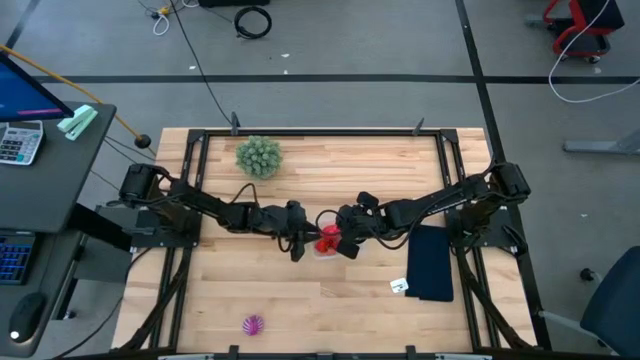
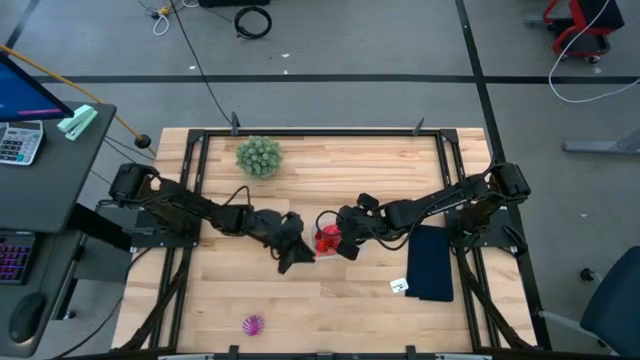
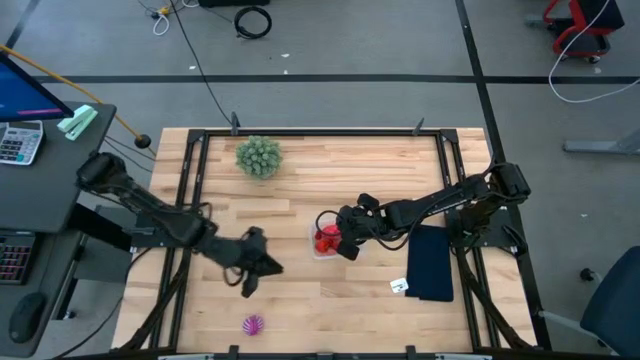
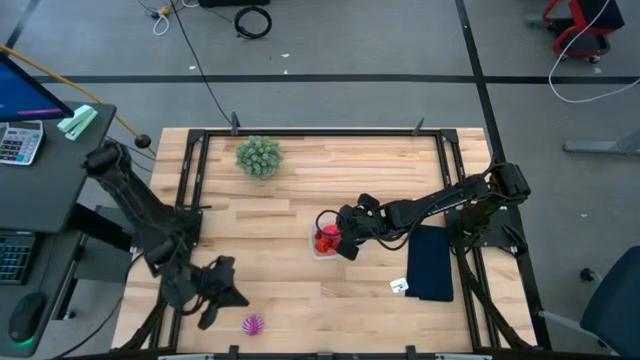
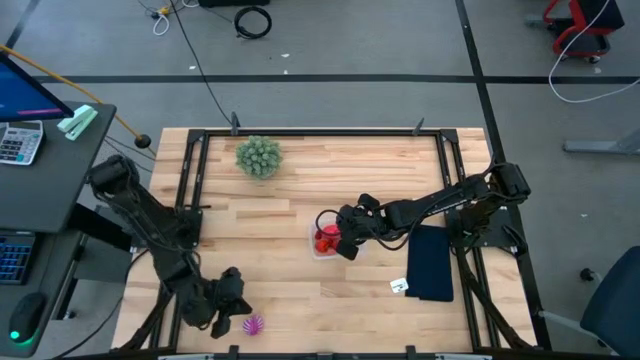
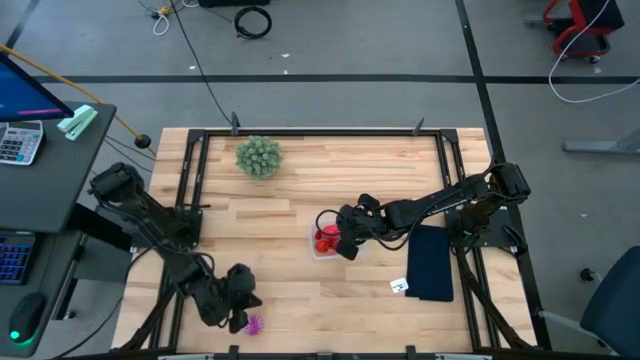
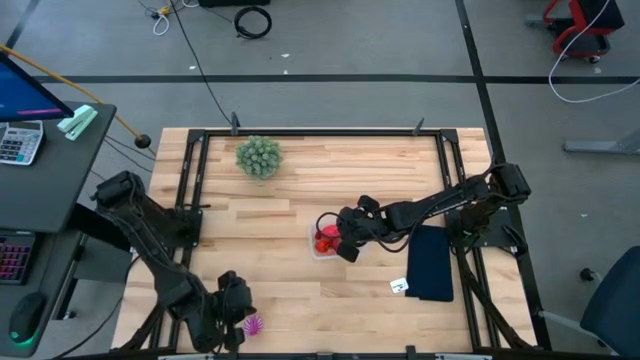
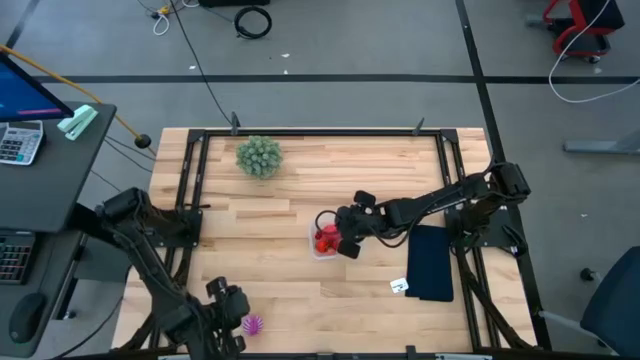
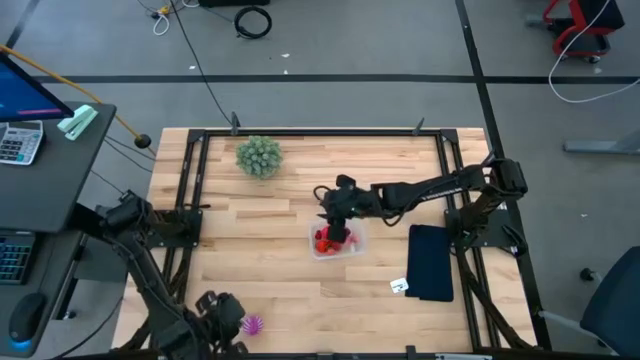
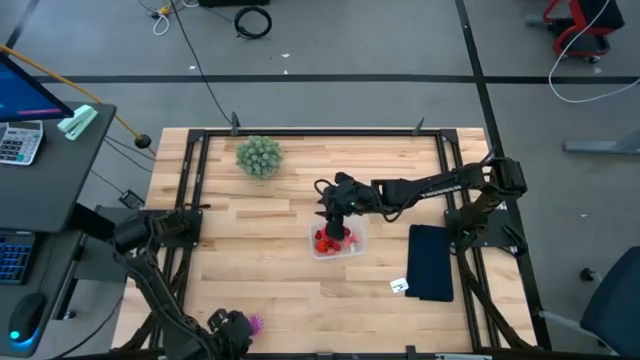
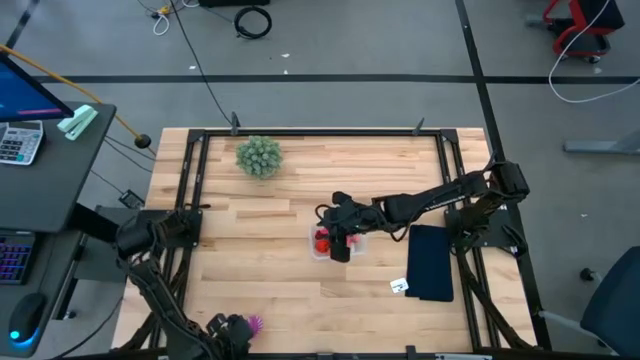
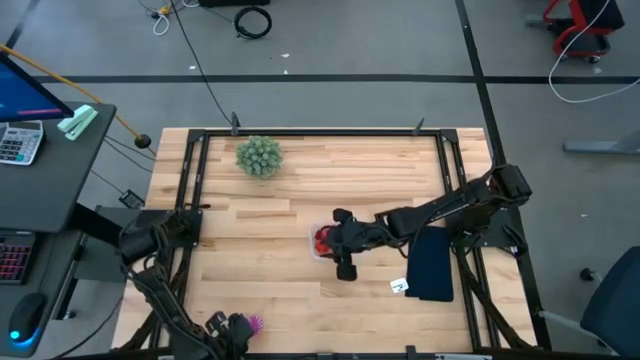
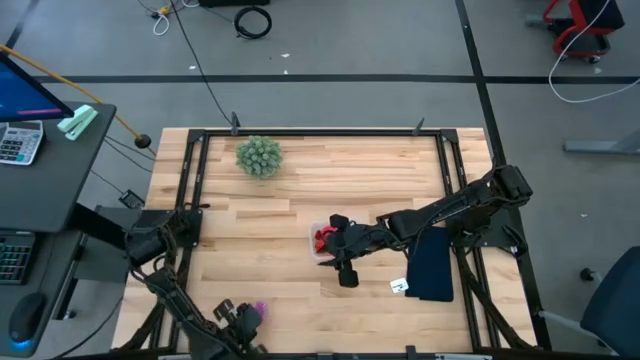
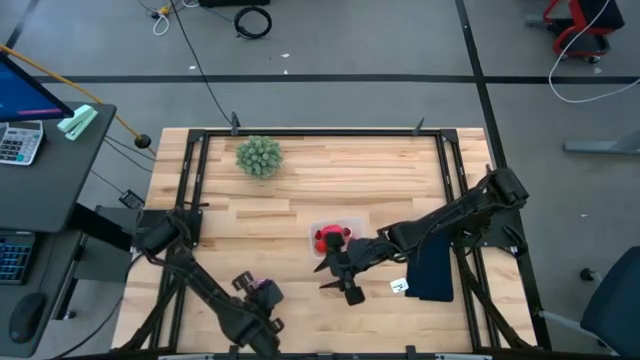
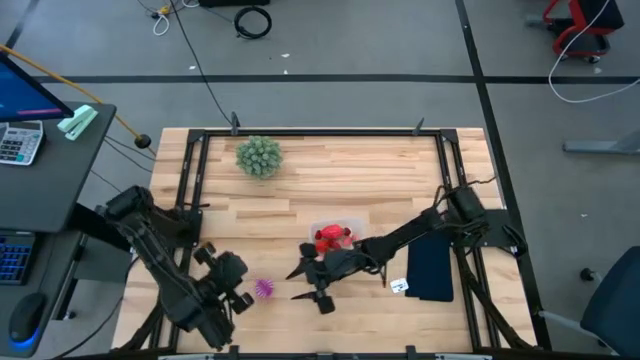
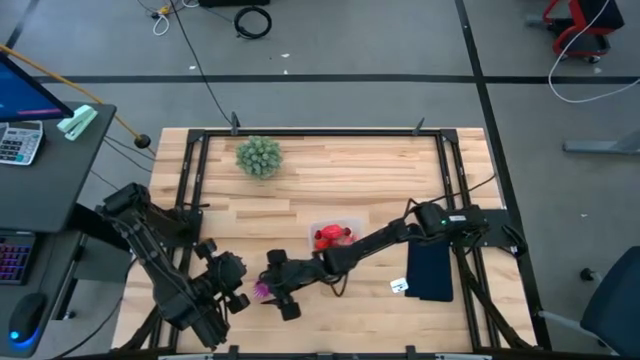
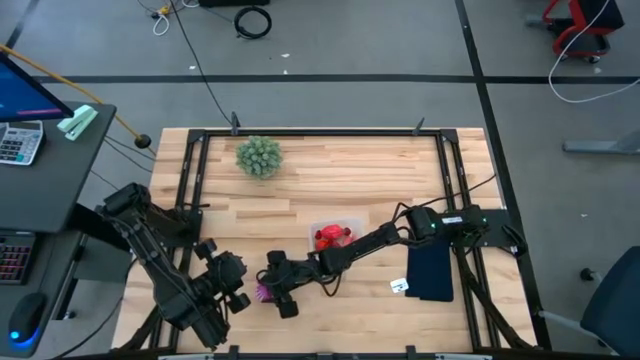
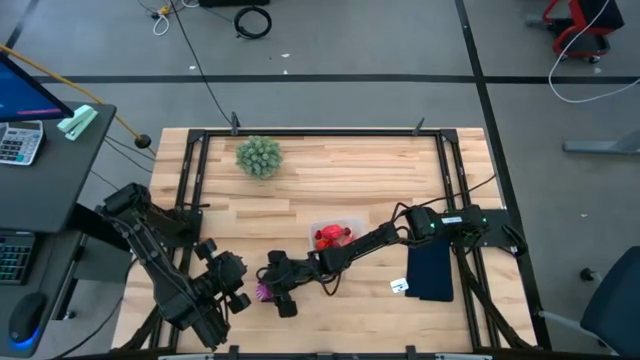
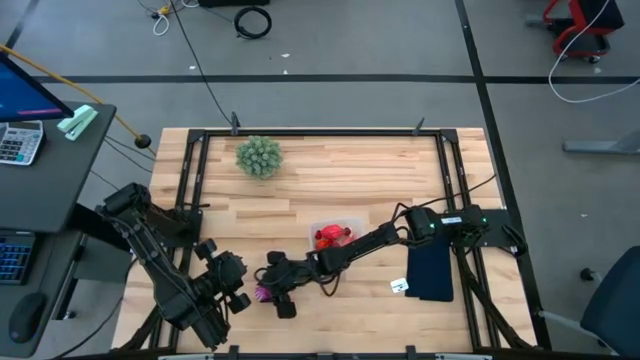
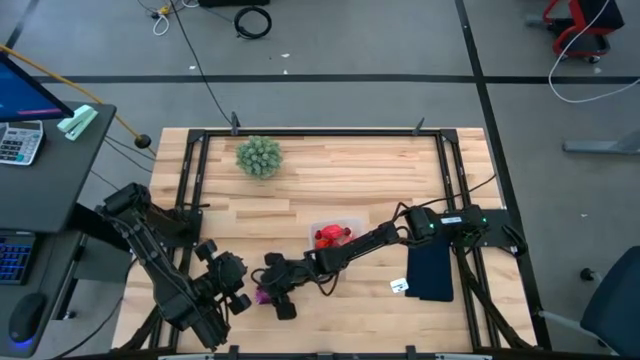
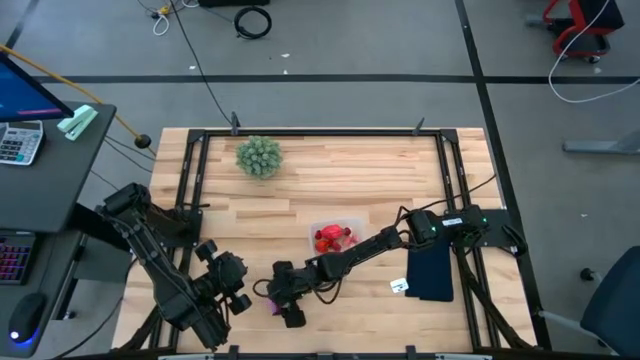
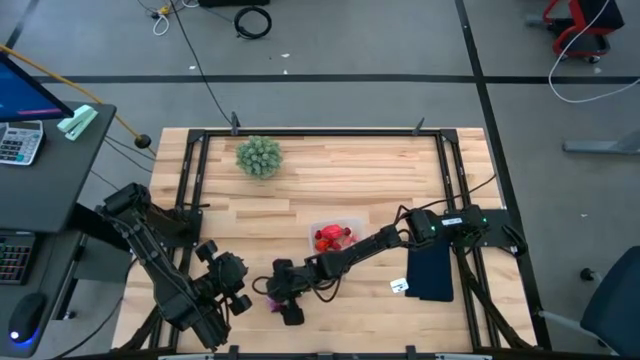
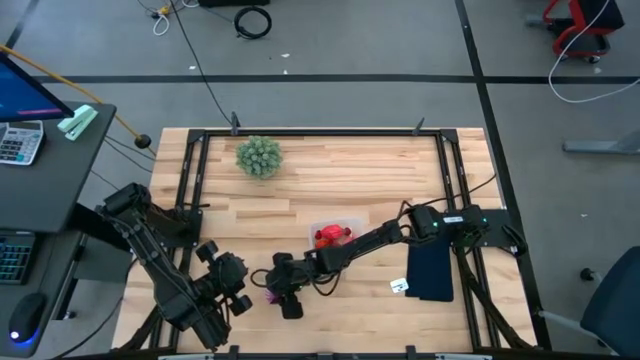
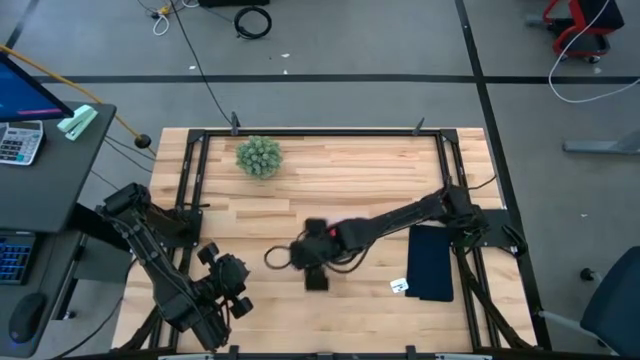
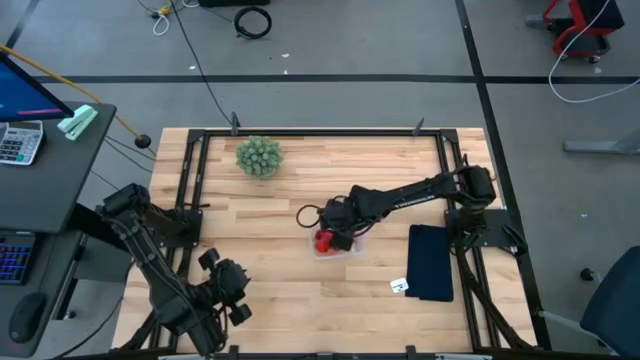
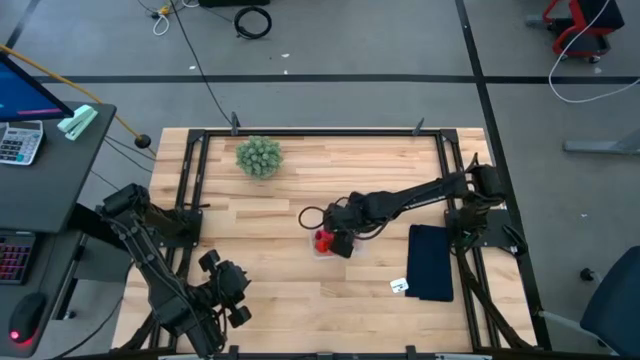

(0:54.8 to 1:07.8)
Task: Pick and placing Produce into tupperware
Put the purple onion into the transparent bin

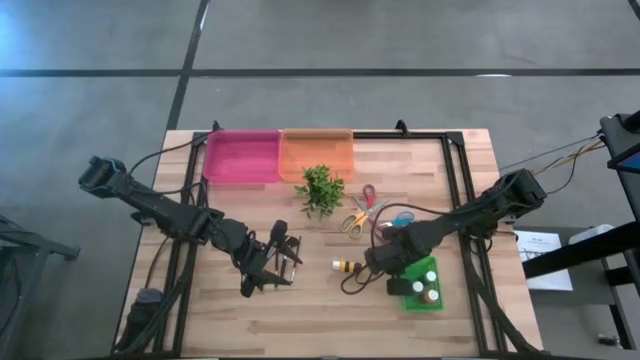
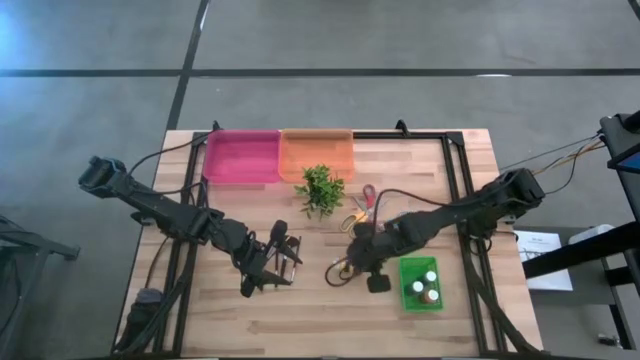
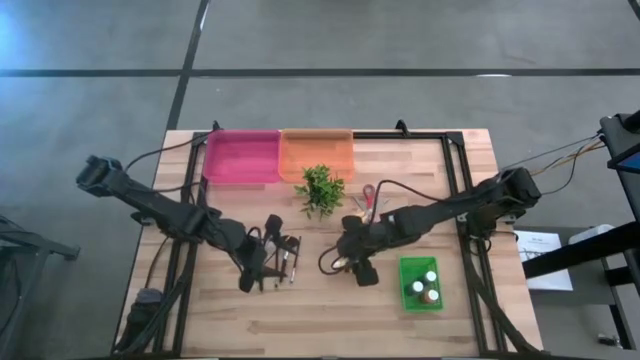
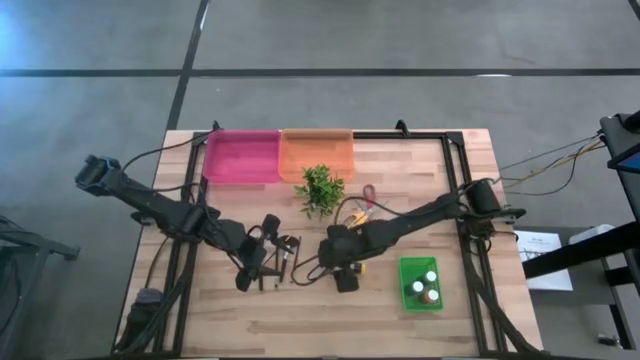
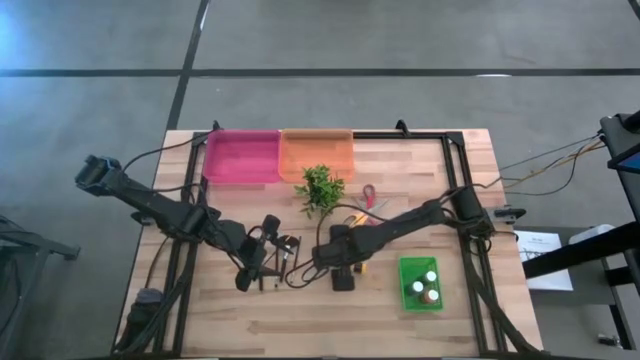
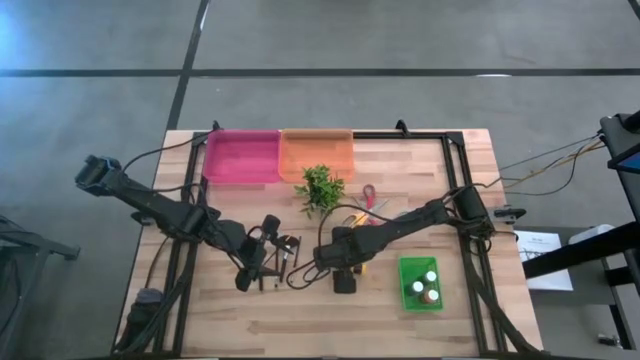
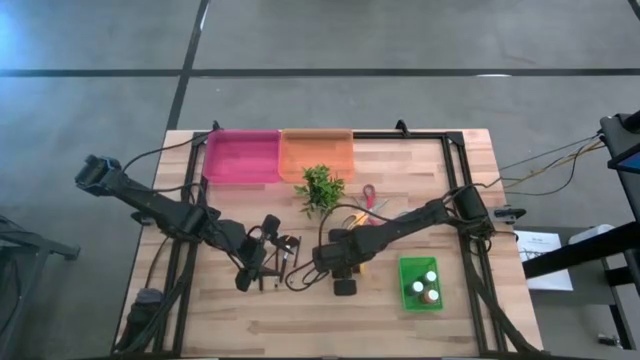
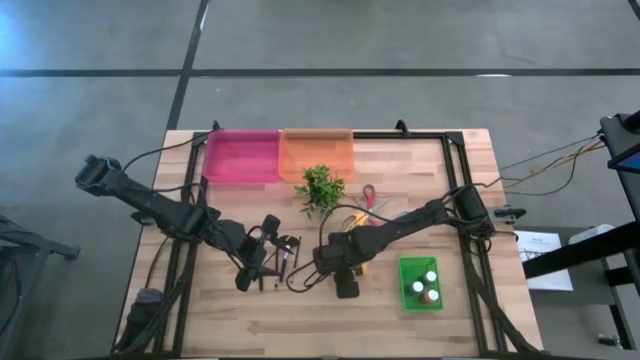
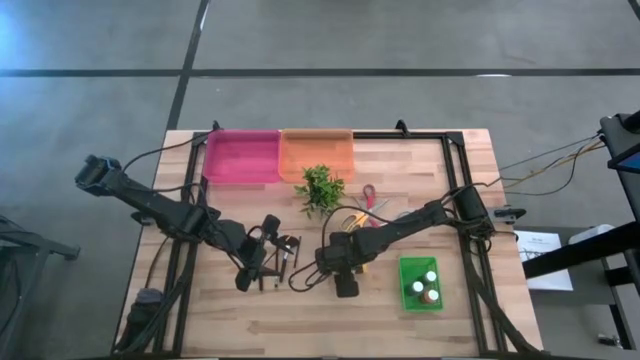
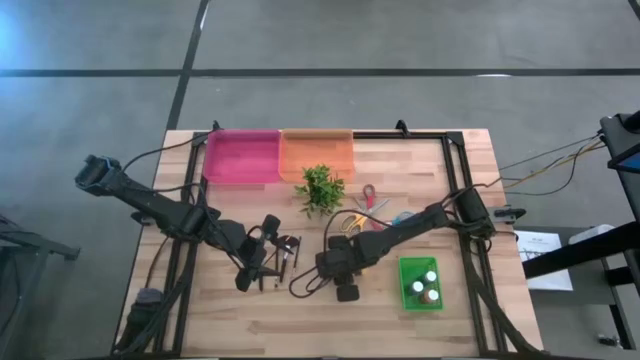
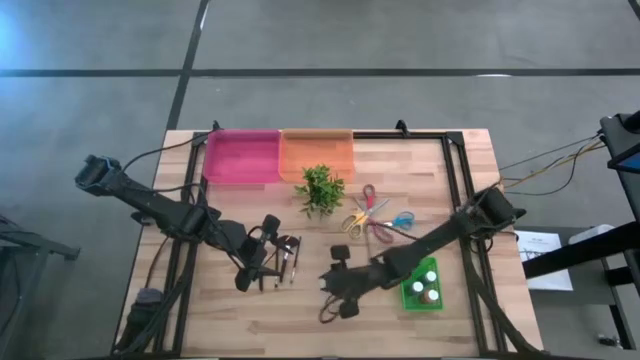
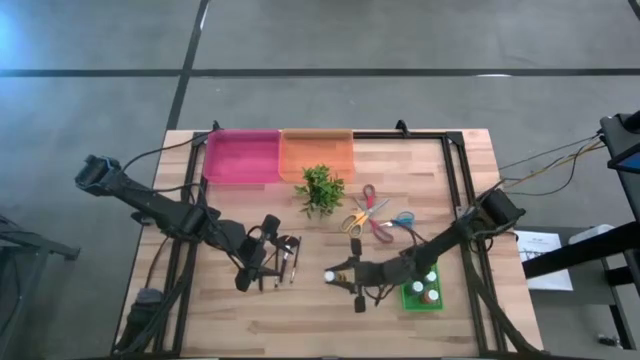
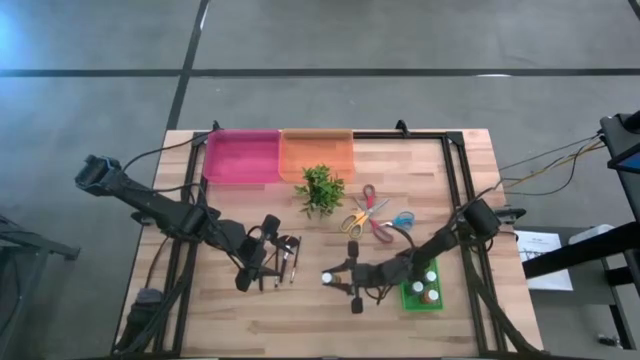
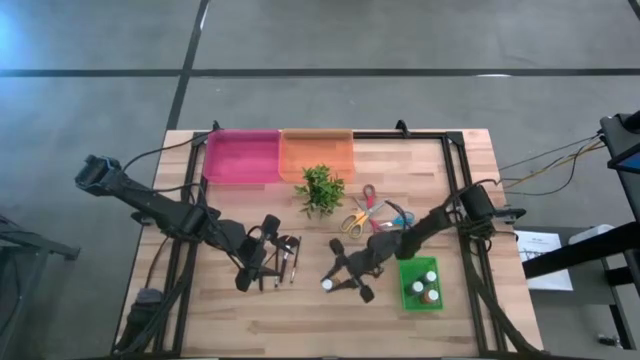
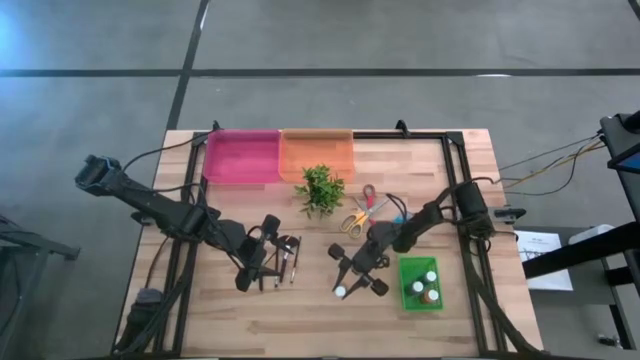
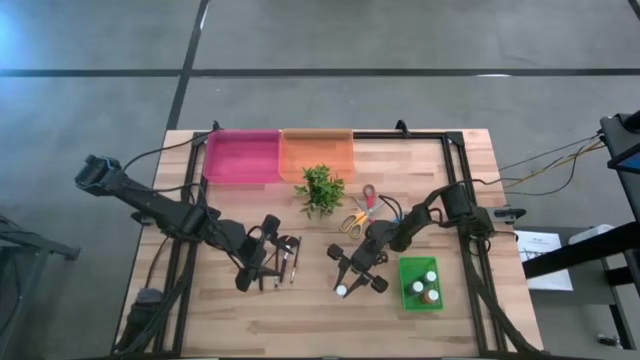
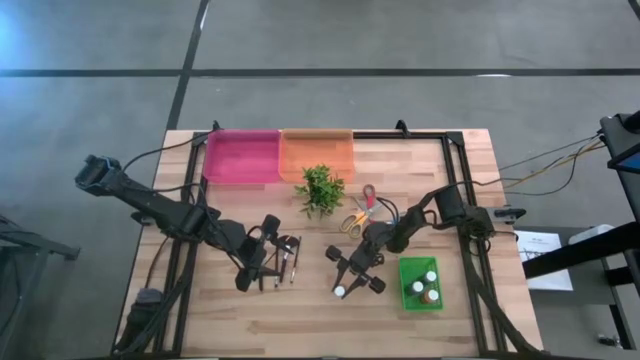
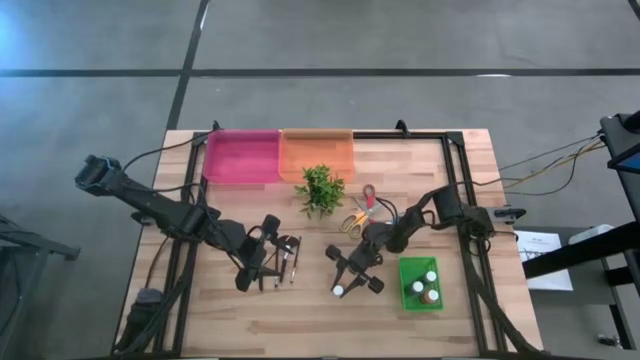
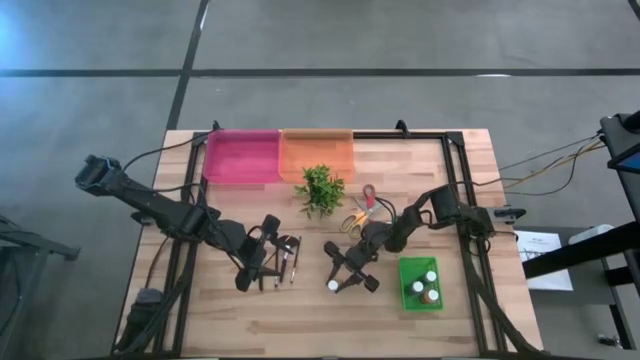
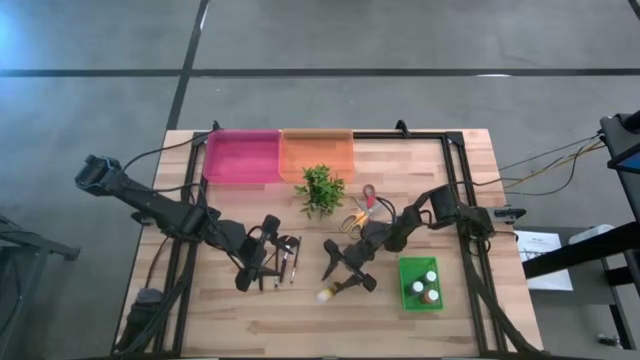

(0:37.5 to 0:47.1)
Task: Pick & Place Paint Supplies
Put the yellow paint bottle into the green bin
